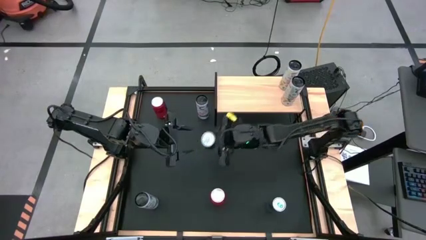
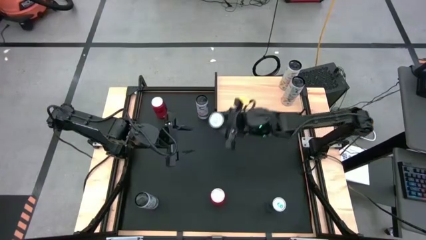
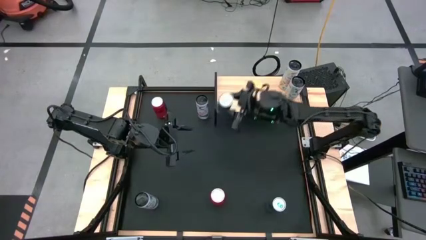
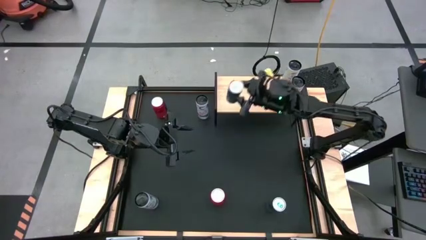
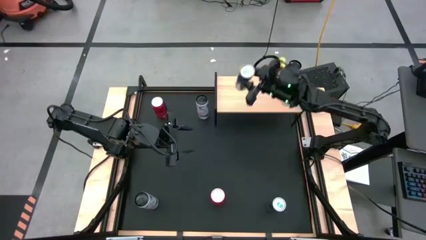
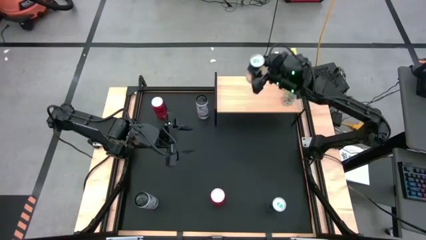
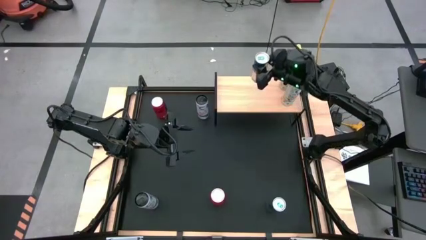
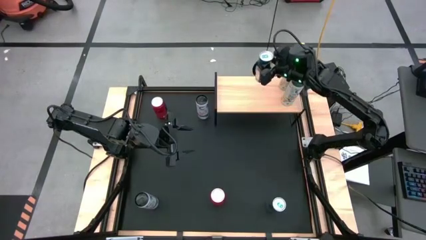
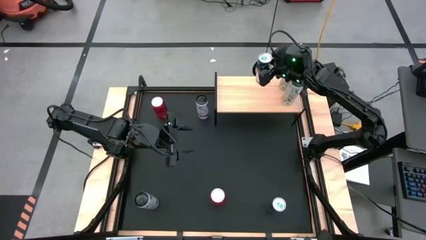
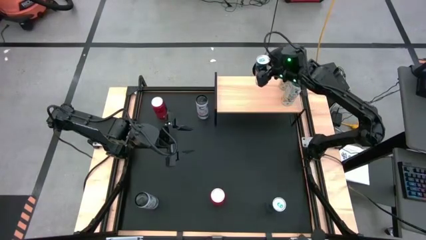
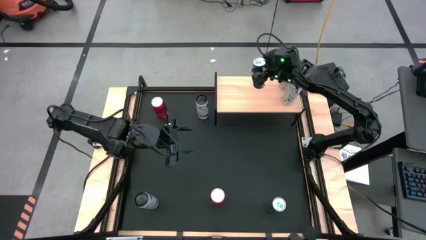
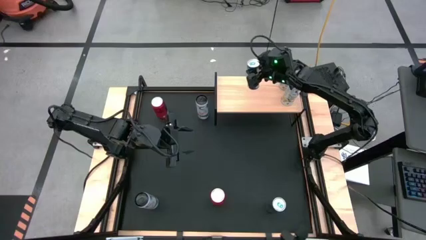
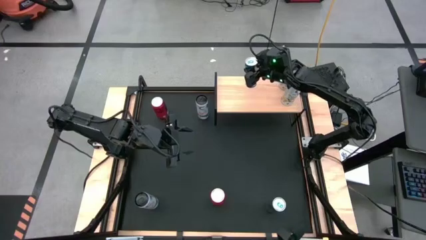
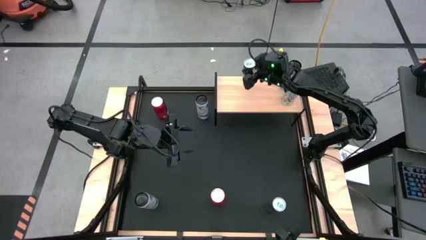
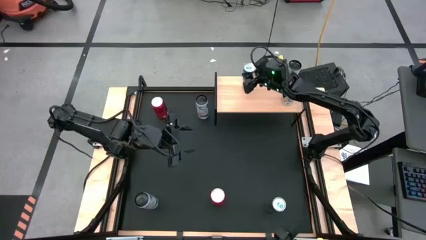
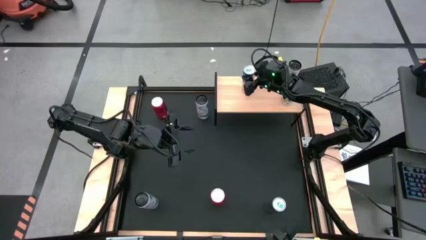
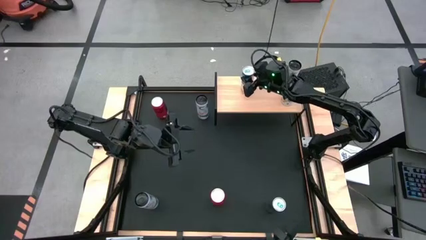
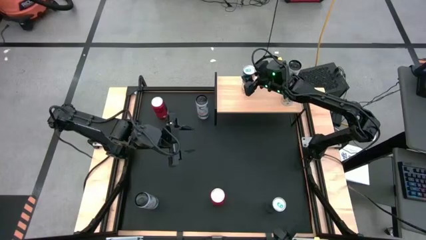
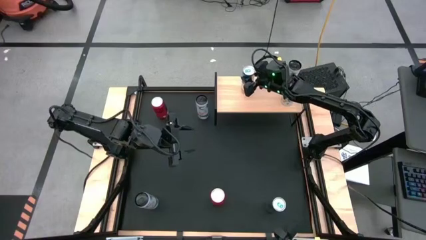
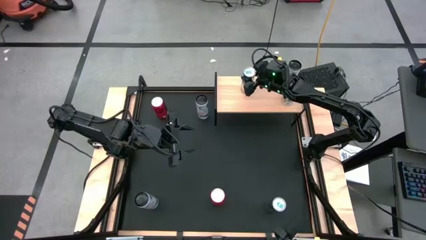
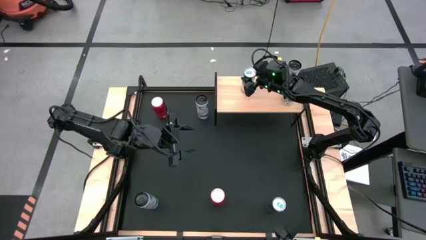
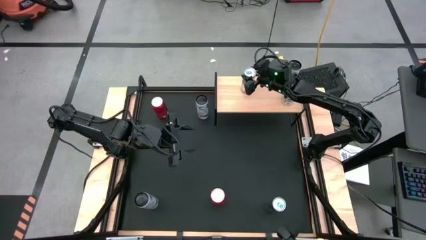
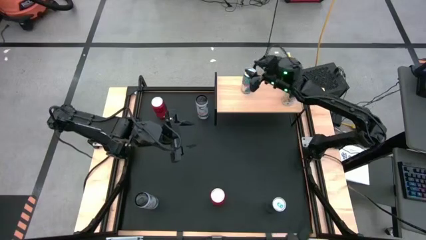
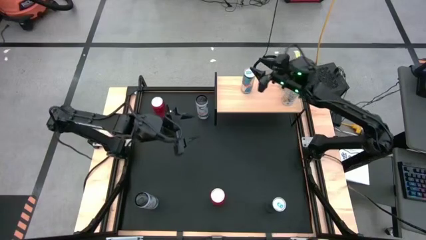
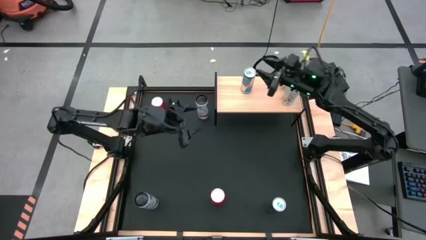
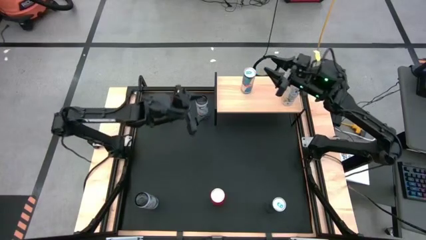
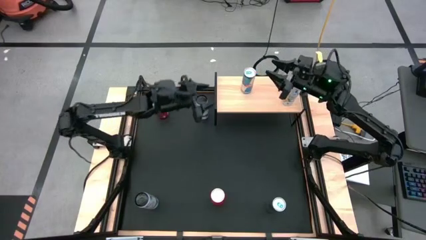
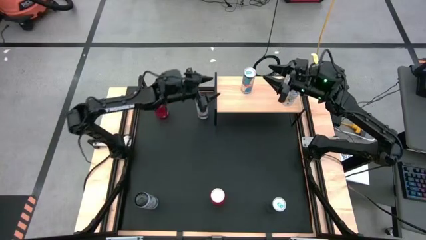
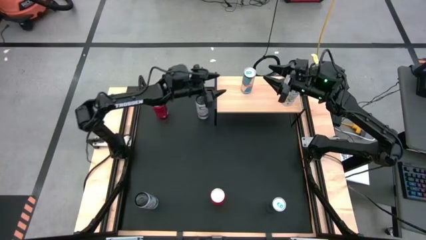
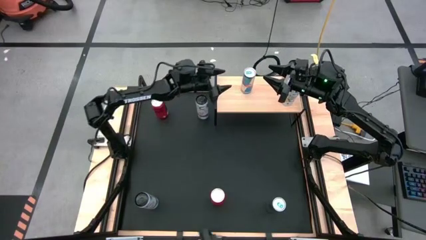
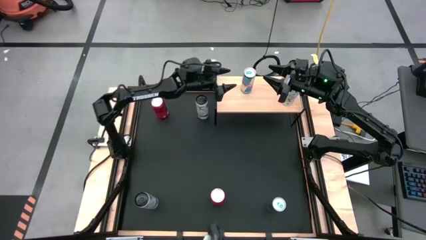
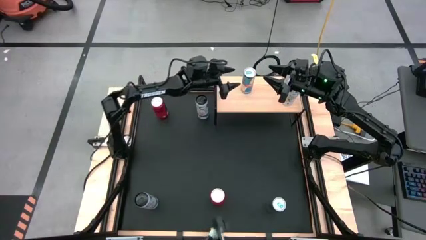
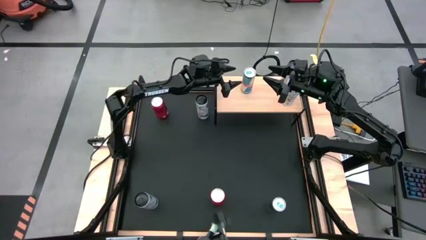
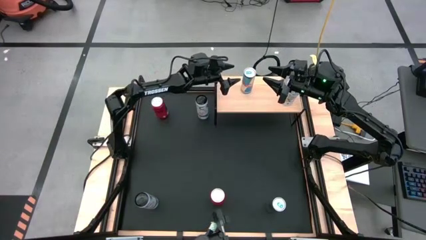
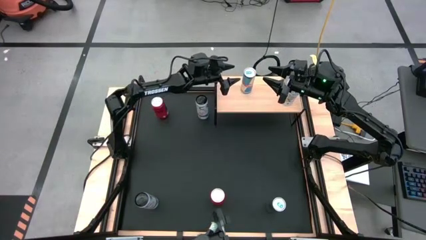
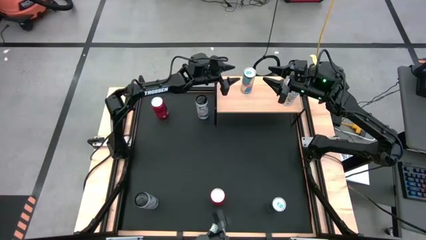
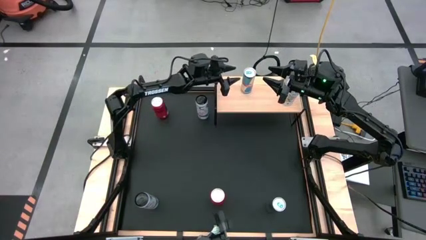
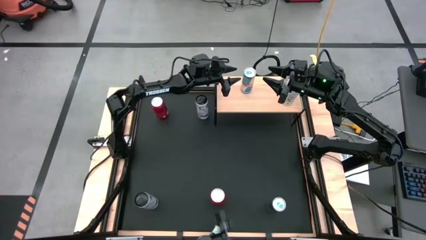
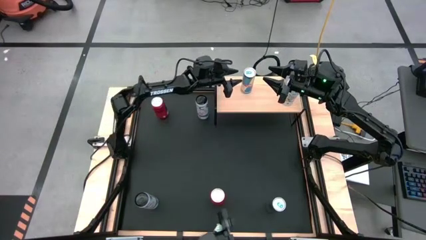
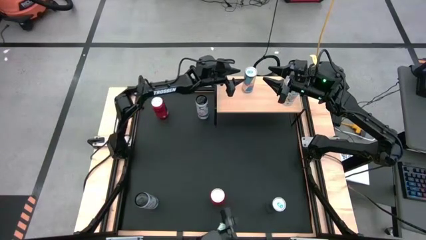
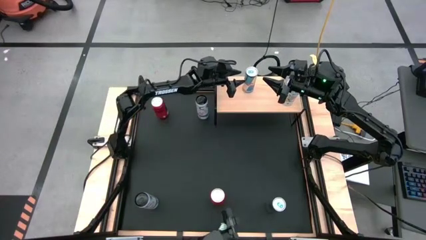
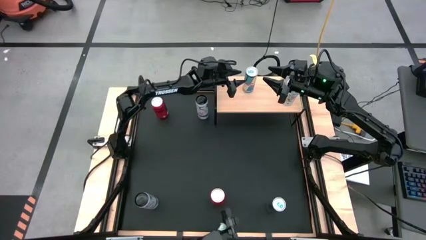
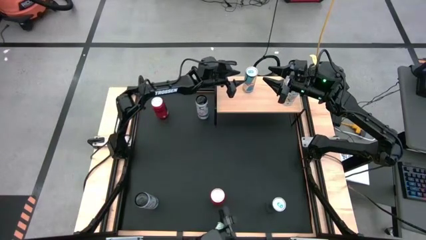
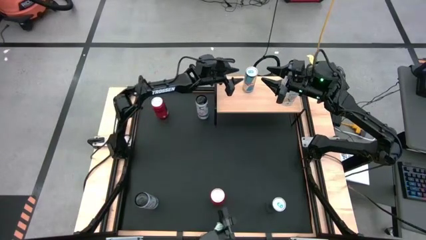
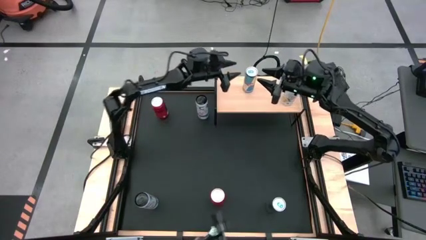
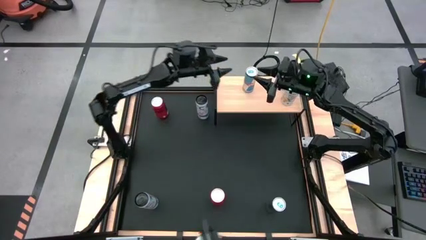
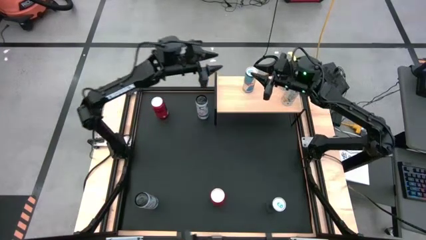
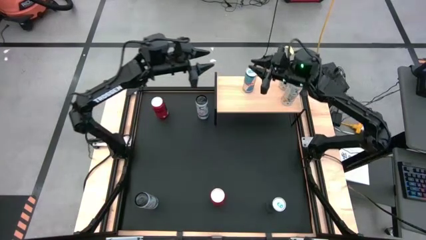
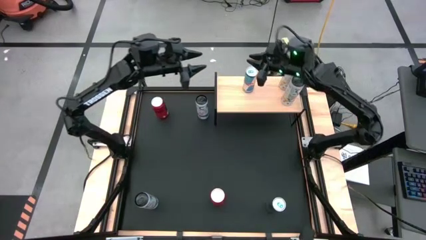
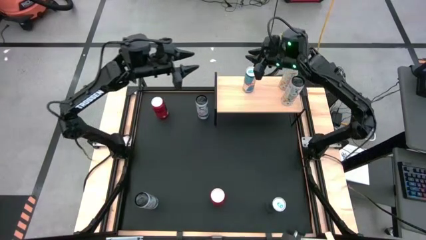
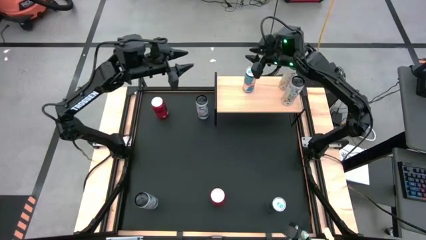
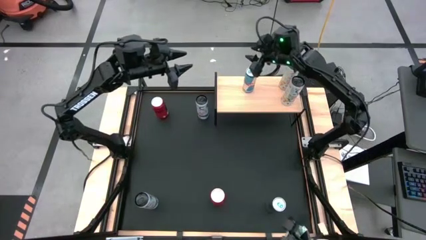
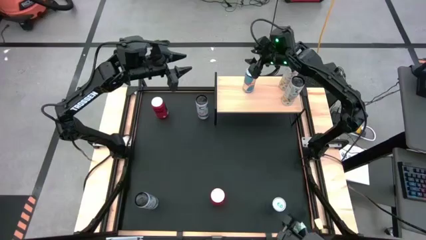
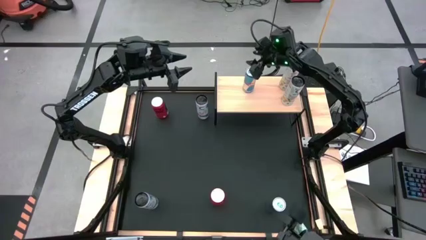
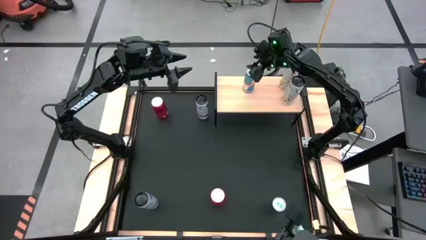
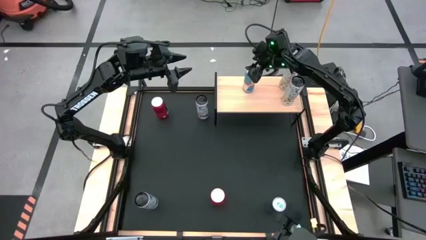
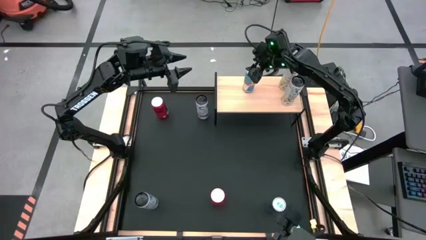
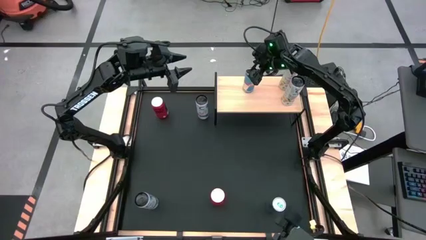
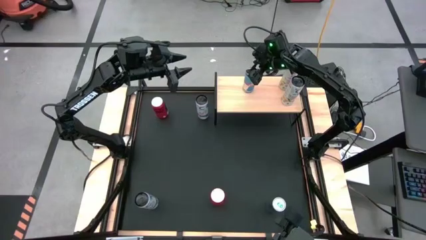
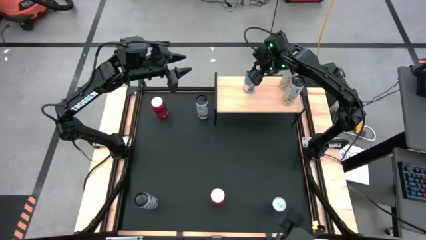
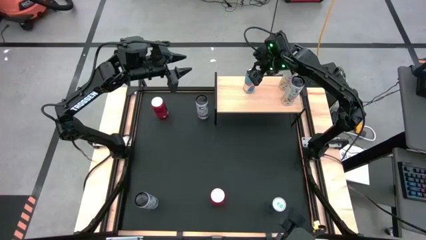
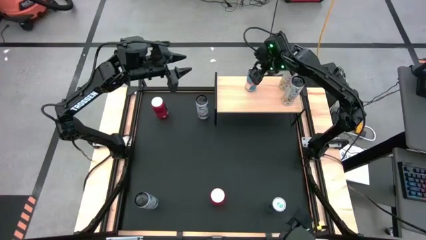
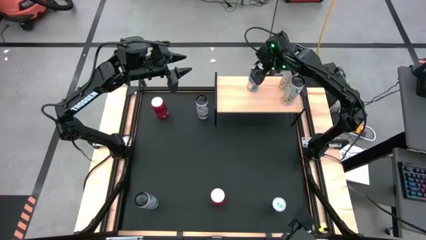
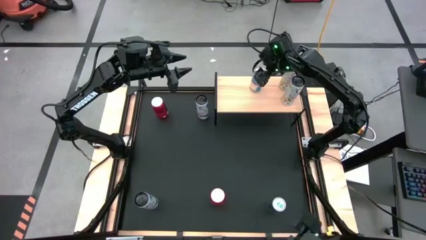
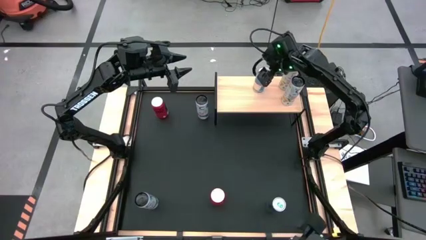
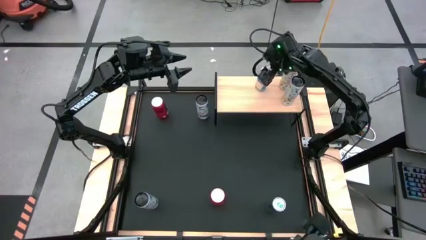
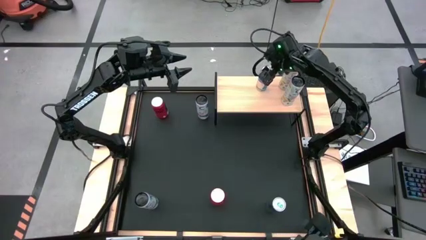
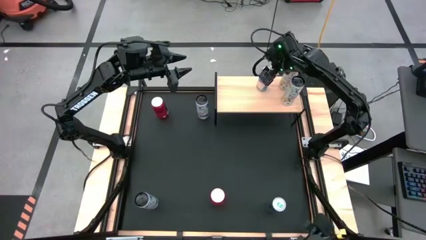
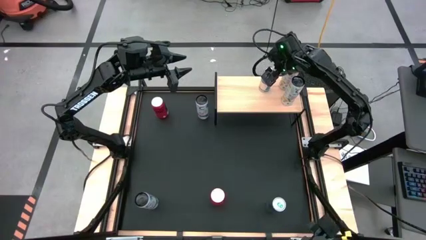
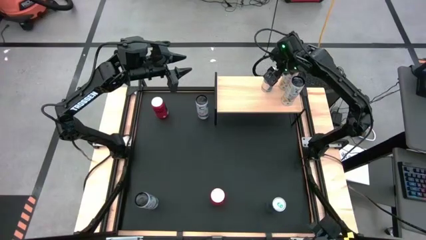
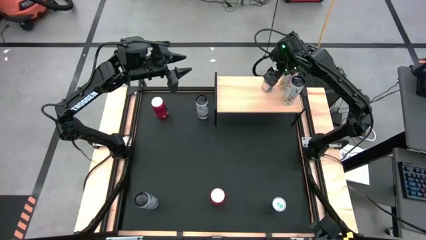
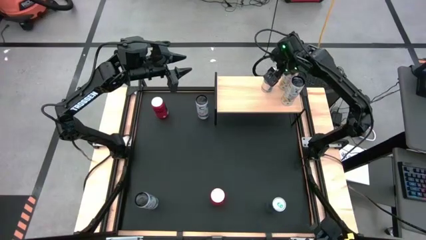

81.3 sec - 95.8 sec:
Task: Place canned beverage on shelf
Put the left blue soda can on the shelf
